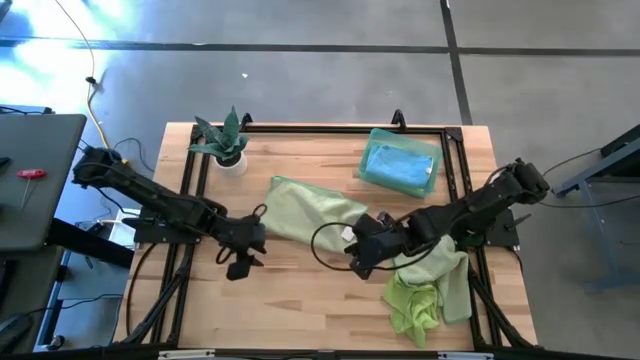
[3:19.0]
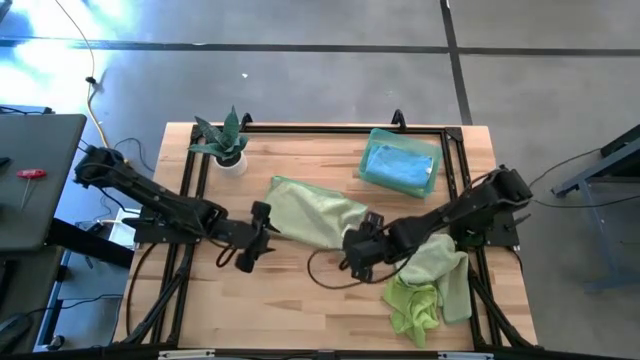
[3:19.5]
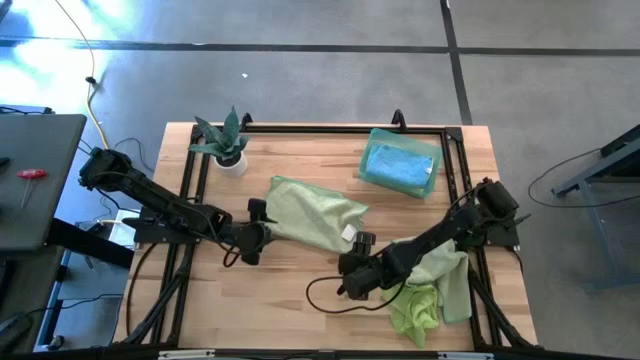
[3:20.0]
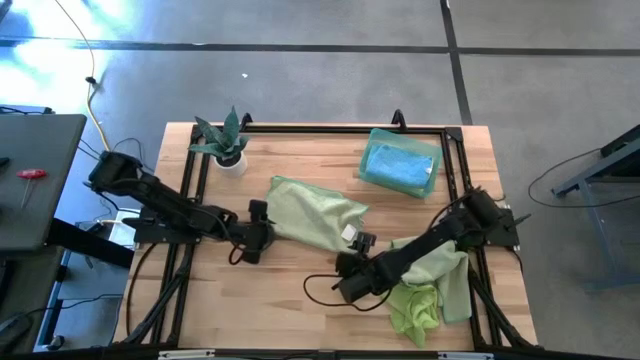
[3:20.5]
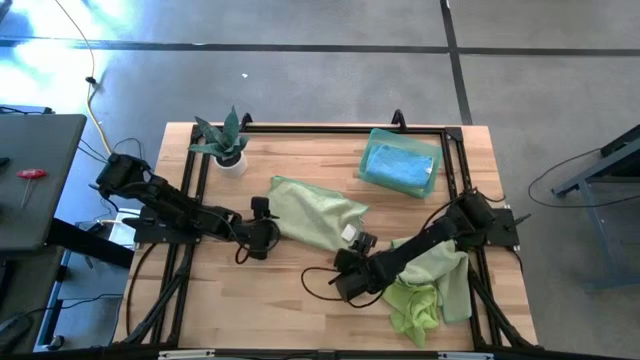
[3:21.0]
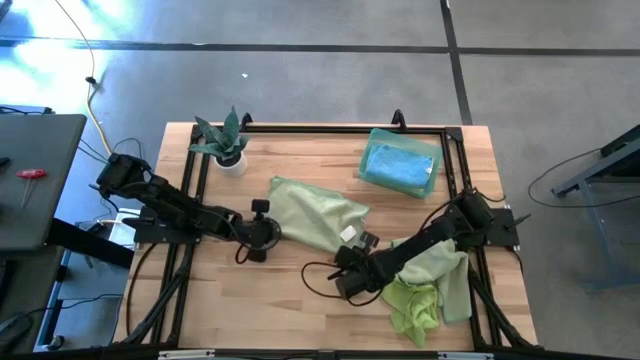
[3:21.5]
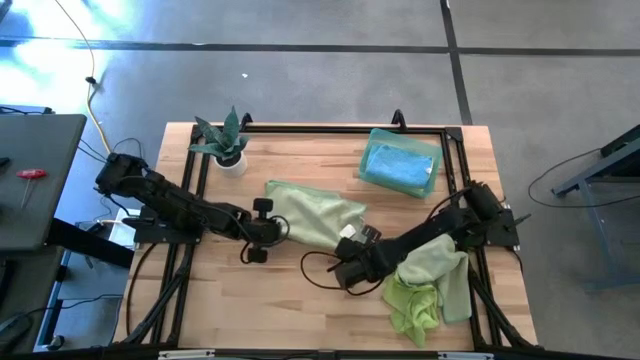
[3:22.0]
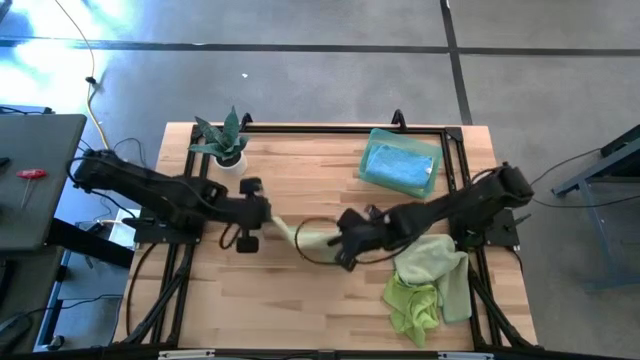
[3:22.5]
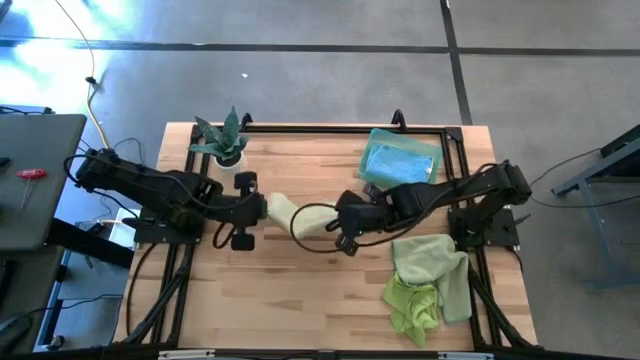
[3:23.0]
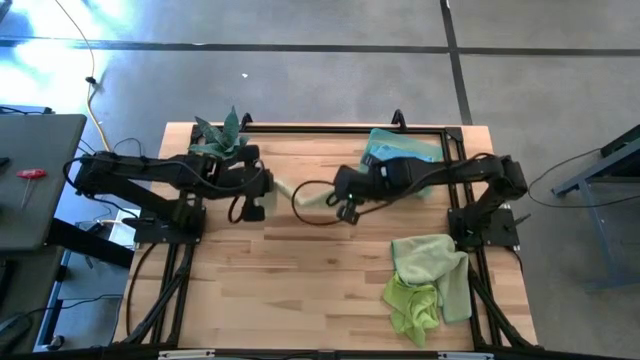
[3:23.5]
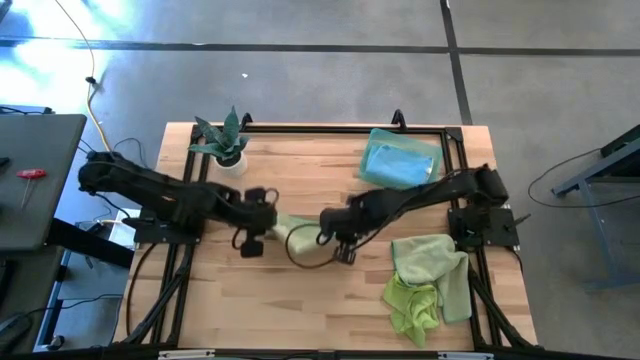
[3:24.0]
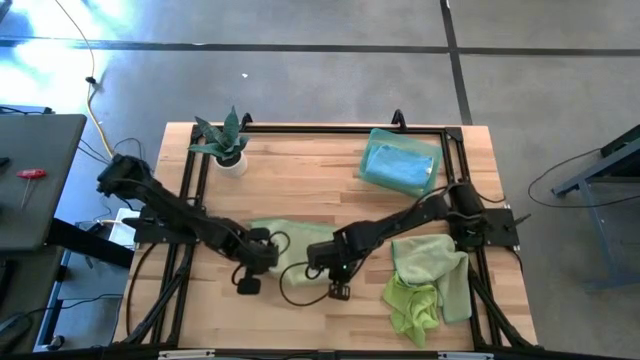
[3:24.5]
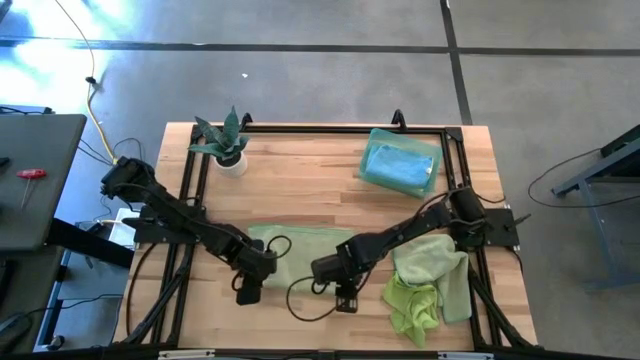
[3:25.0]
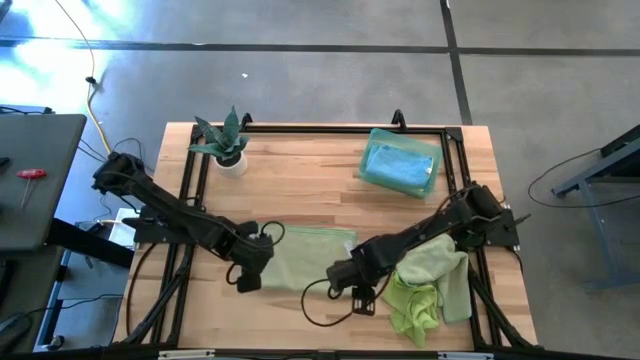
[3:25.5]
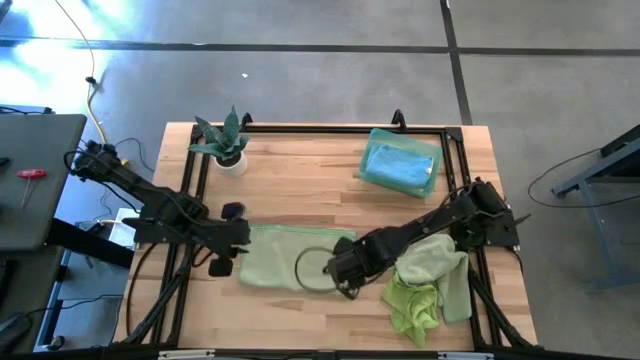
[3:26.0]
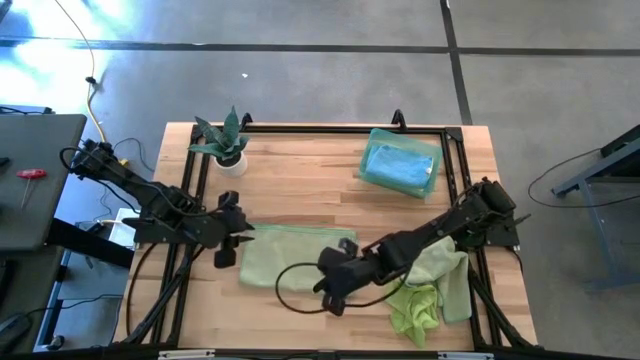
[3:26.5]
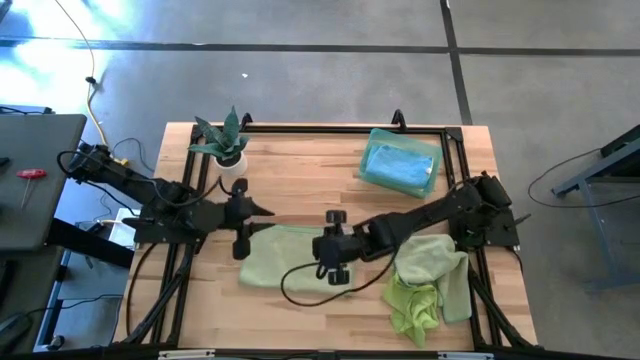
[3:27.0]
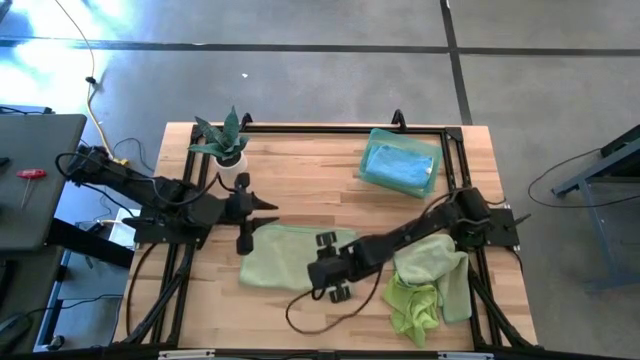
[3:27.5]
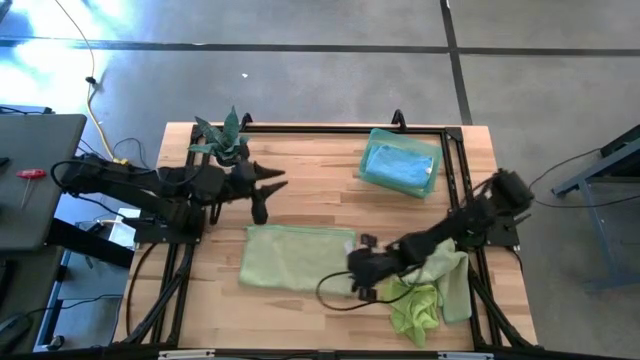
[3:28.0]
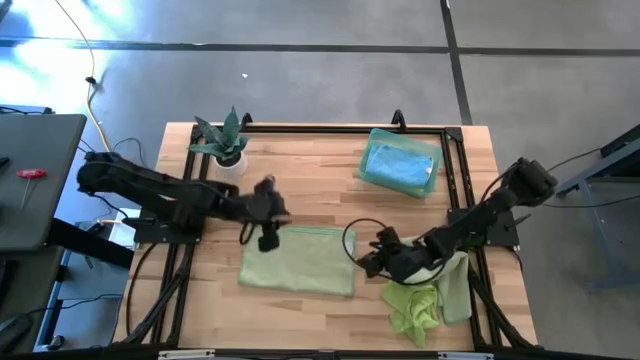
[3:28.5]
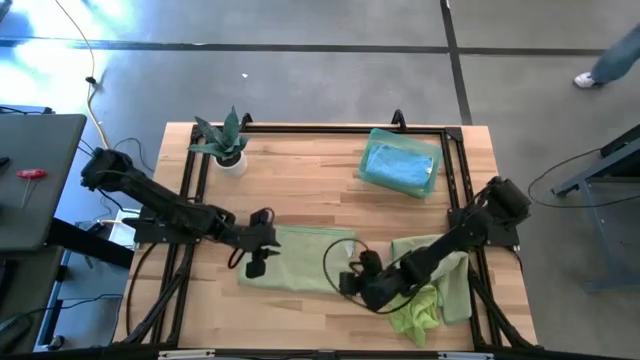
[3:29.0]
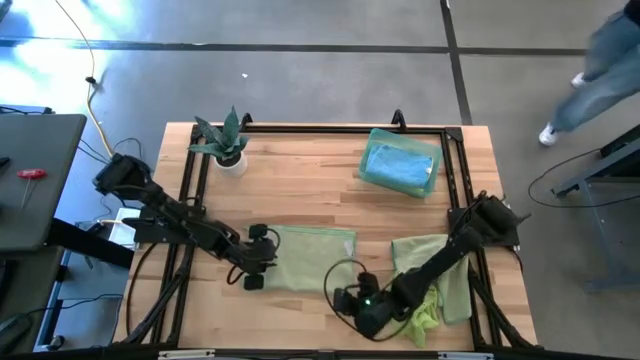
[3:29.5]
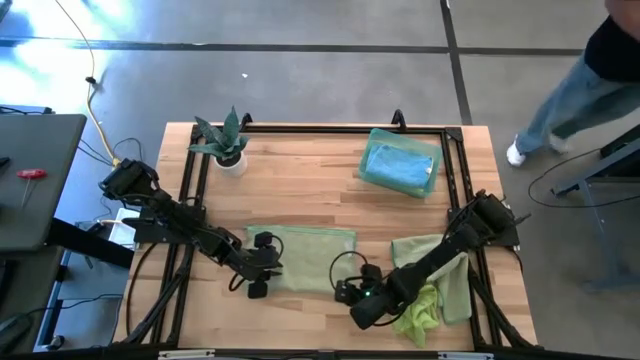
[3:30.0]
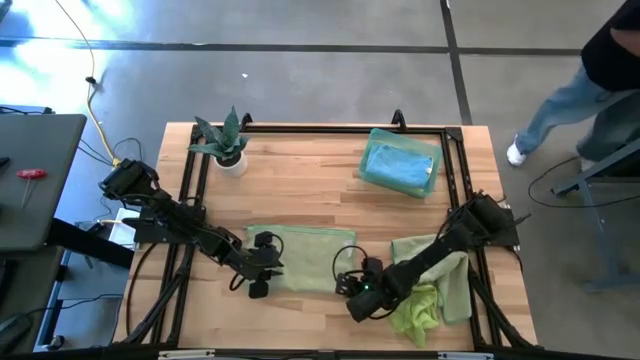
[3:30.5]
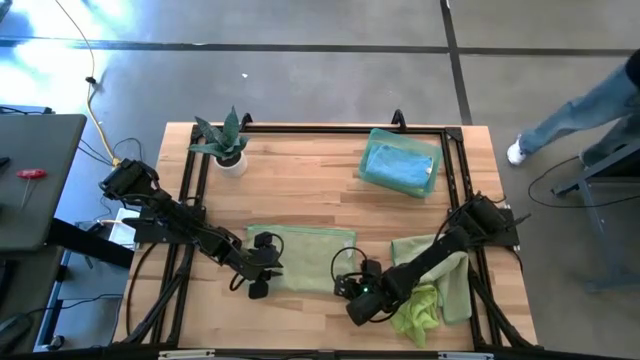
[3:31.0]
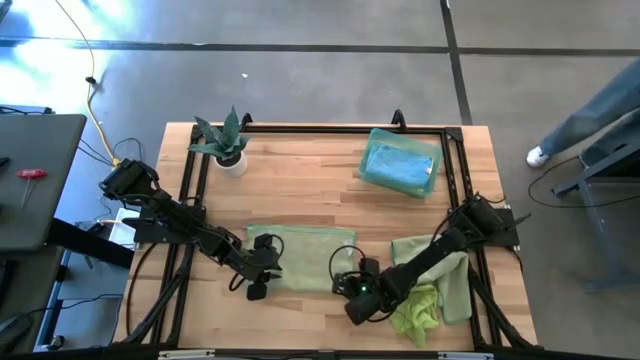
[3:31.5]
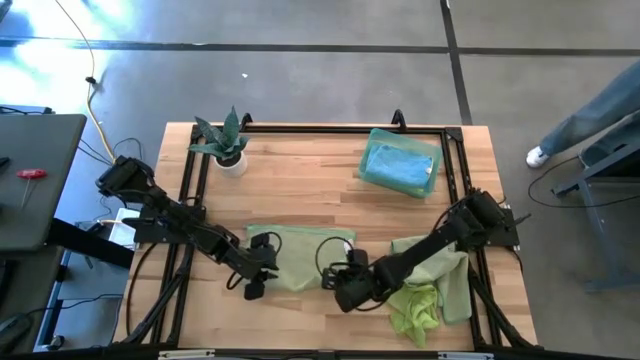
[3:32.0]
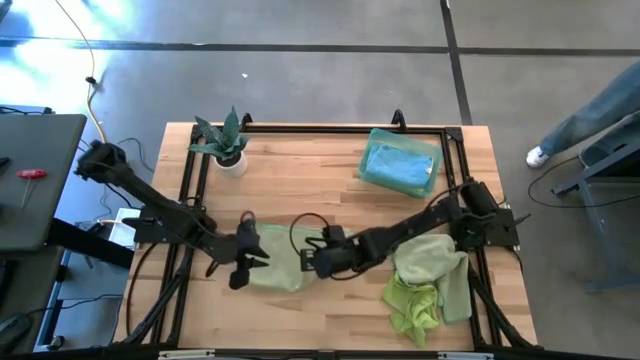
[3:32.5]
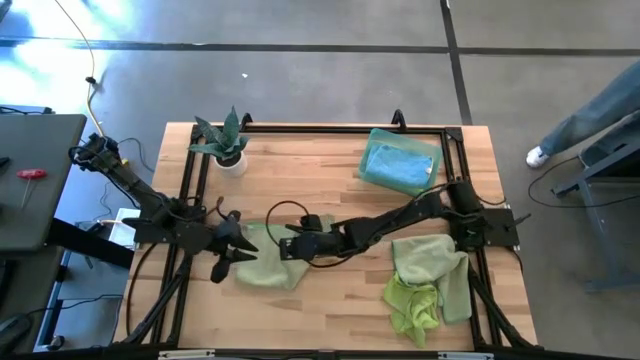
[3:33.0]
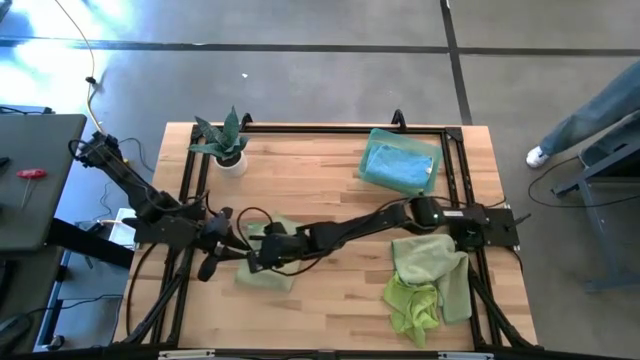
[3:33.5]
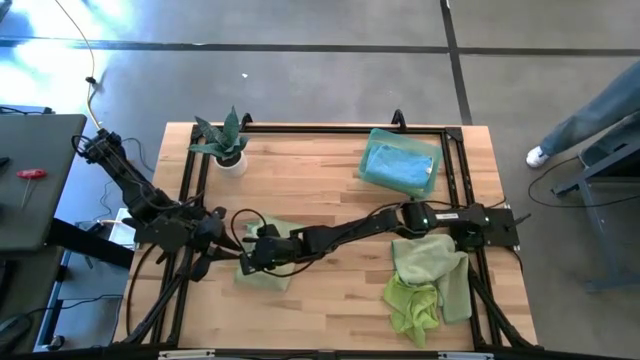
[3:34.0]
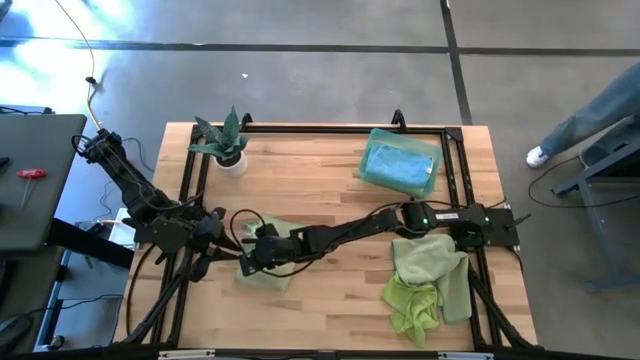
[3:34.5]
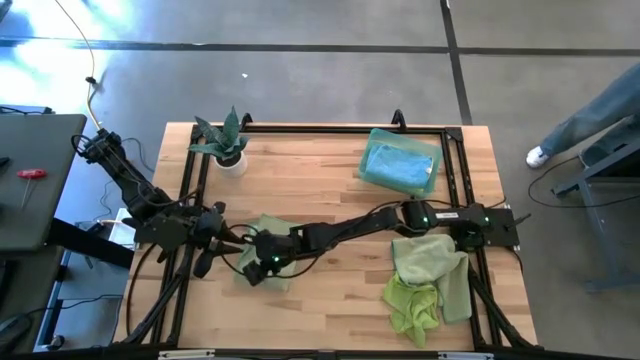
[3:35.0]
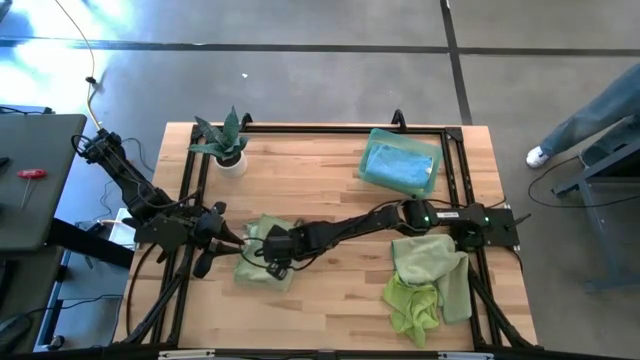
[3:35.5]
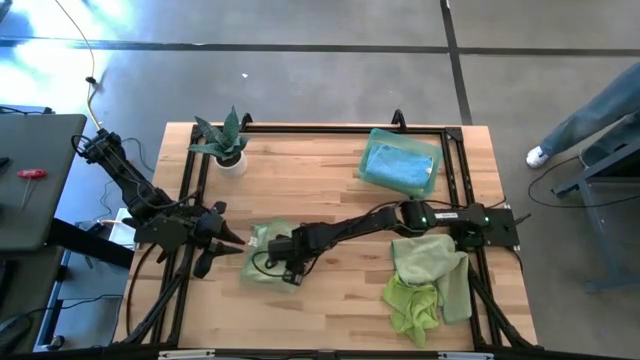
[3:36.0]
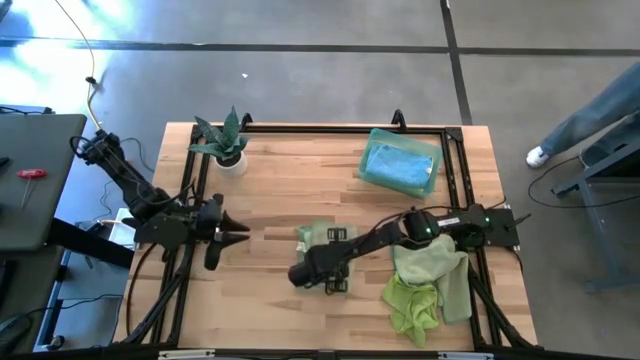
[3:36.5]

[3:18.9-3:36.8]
Task: Fold microfiber towels
Fold the left green microfiber cloth

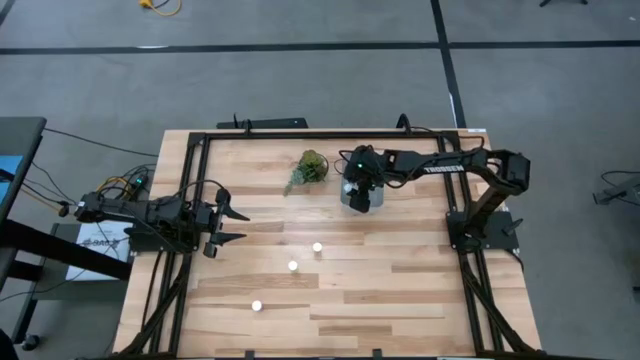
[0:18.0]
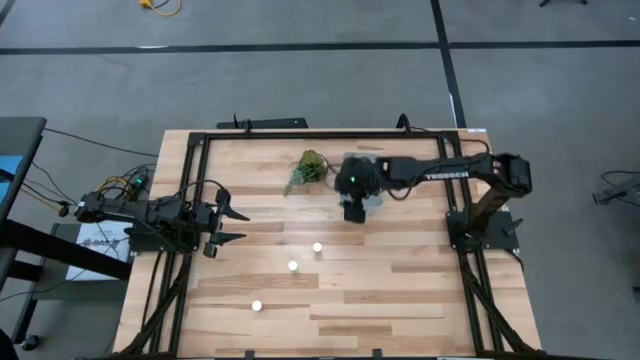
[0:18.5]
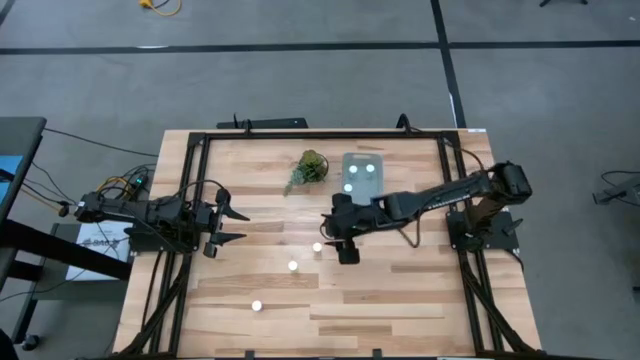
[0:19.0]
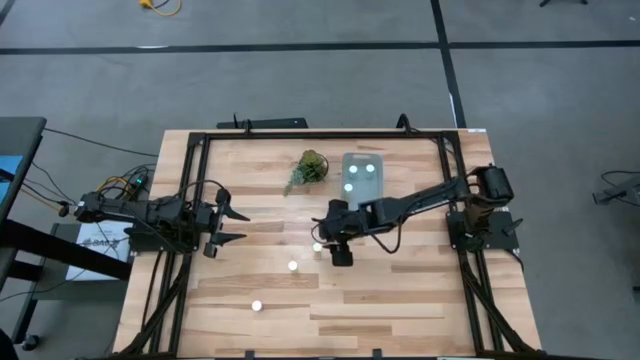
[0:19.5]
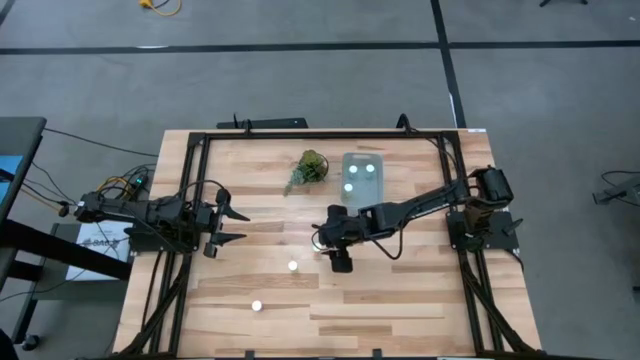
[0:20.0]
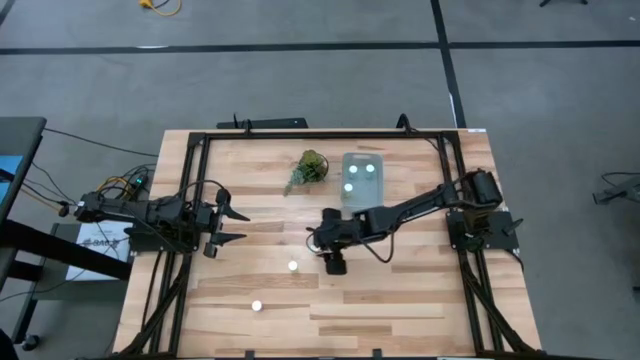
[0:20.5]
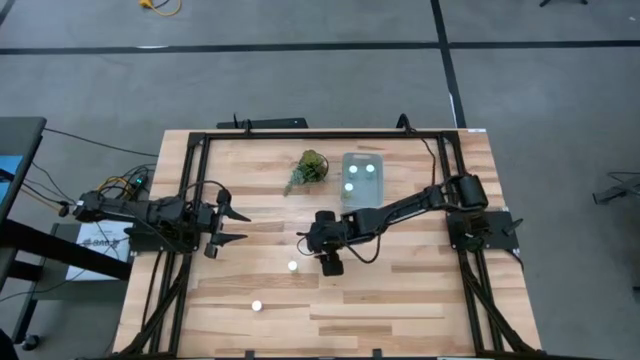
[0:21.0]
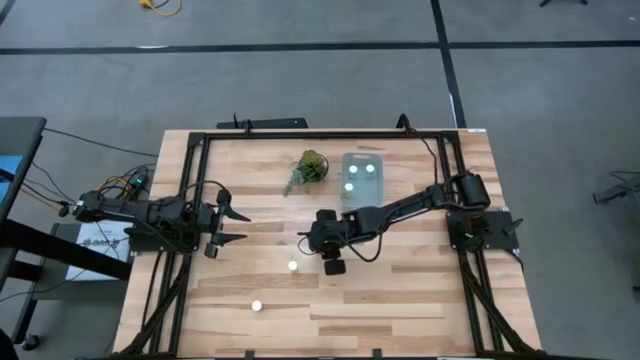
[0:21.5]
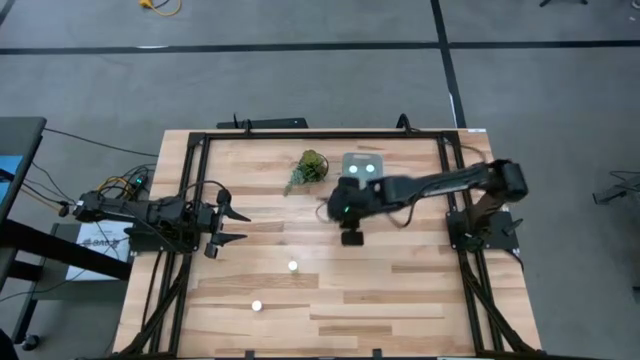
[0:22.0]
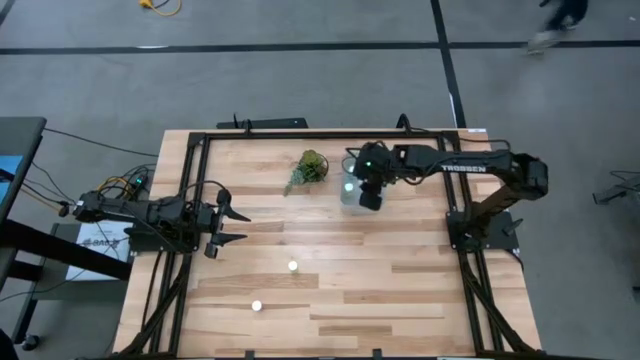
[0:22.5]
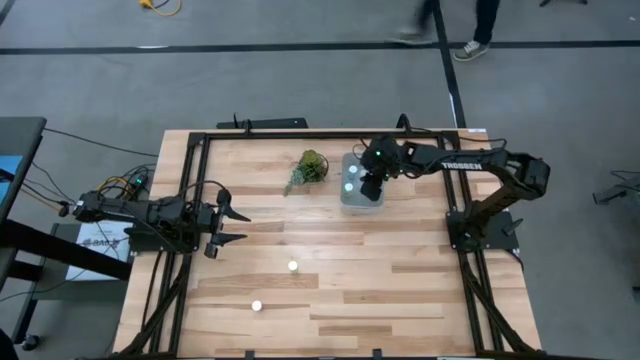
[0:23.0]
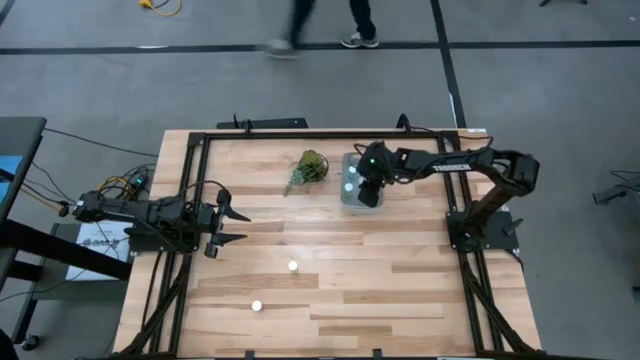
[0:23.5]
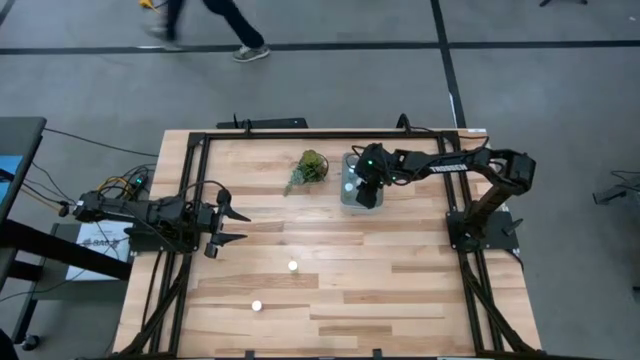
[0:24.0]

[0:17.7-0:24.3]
Task: Pick and place pill bottles into a basket
Put the right yellow pill bottle into the gray bin
